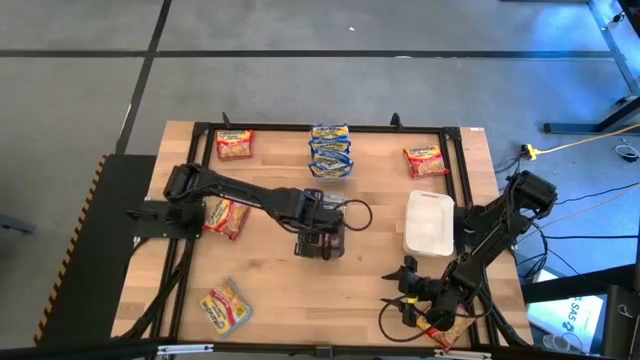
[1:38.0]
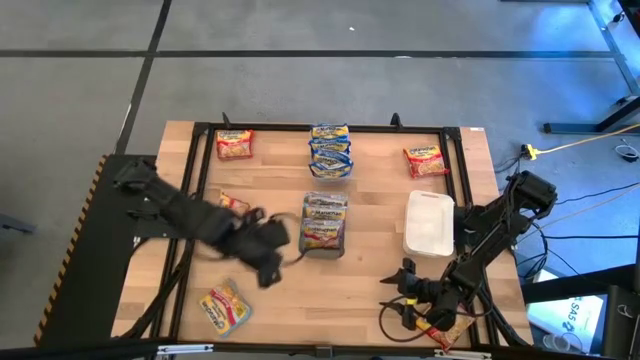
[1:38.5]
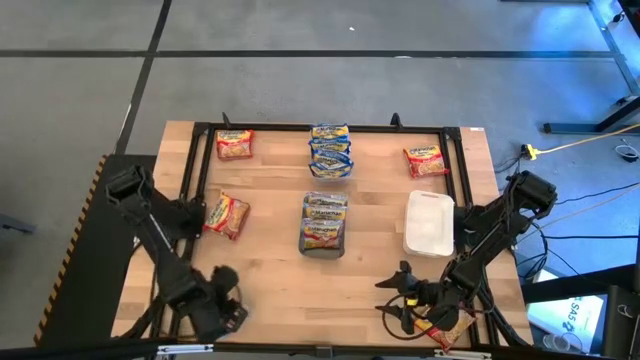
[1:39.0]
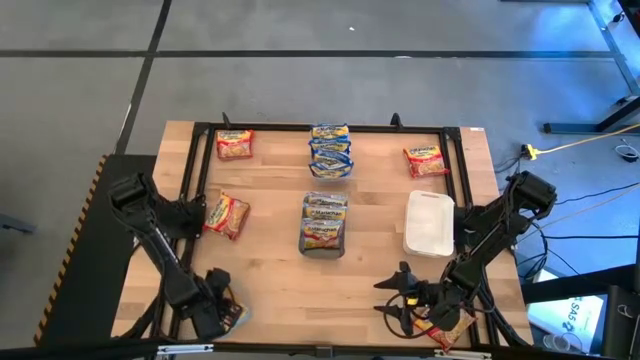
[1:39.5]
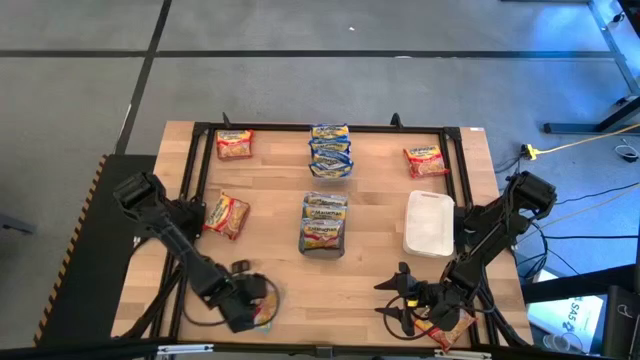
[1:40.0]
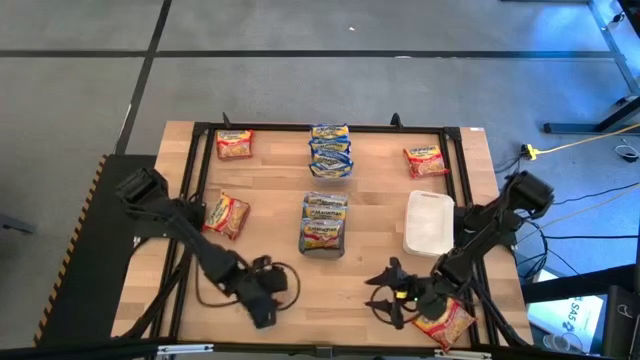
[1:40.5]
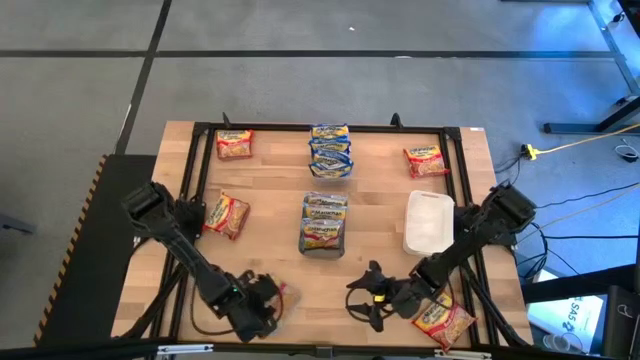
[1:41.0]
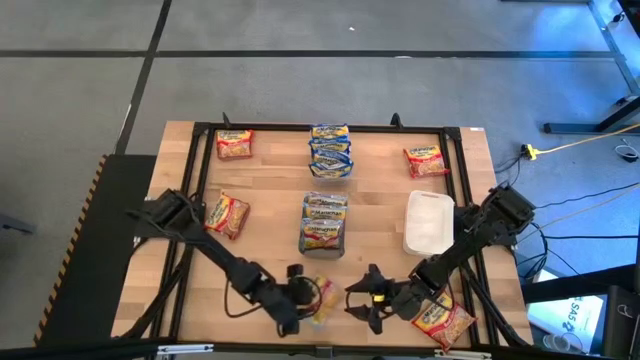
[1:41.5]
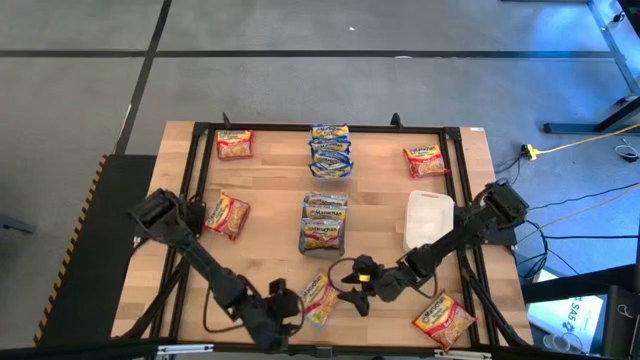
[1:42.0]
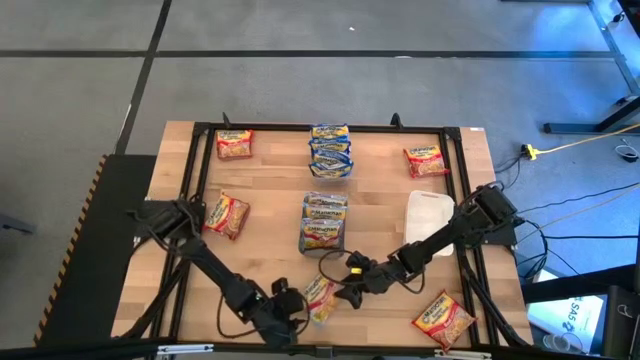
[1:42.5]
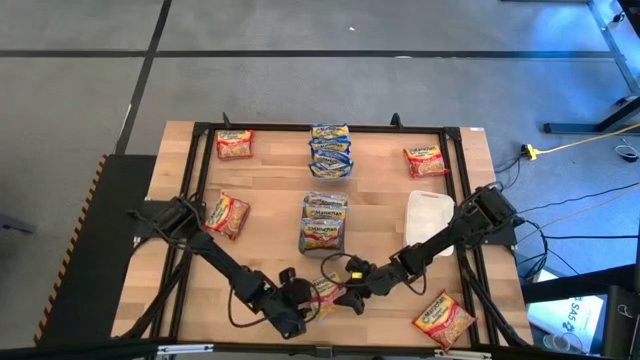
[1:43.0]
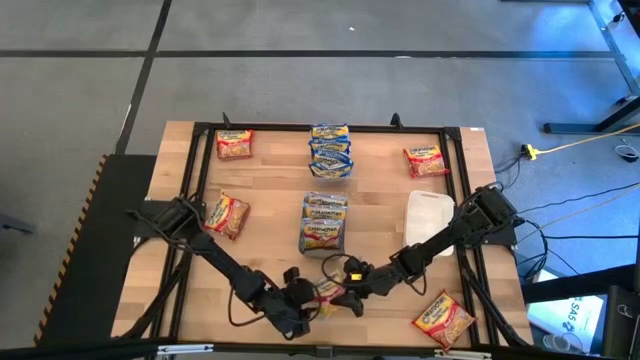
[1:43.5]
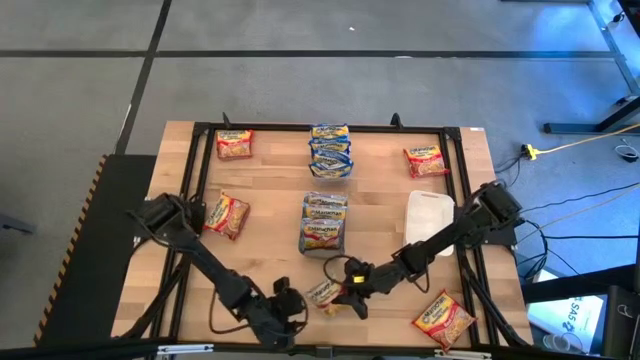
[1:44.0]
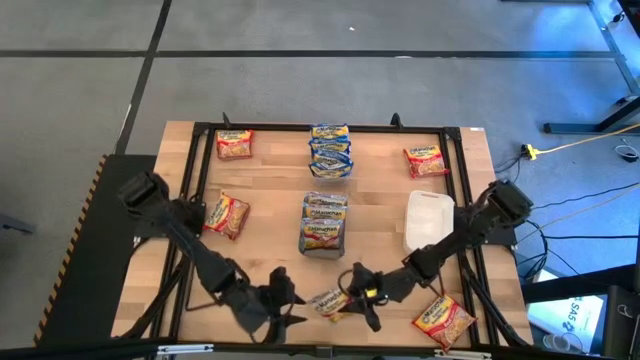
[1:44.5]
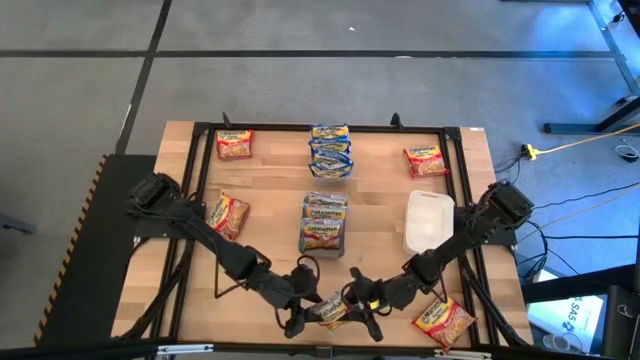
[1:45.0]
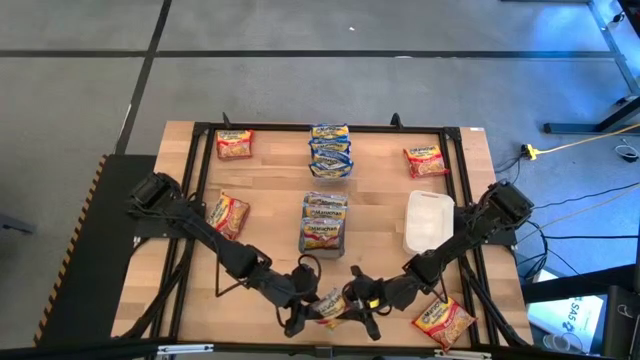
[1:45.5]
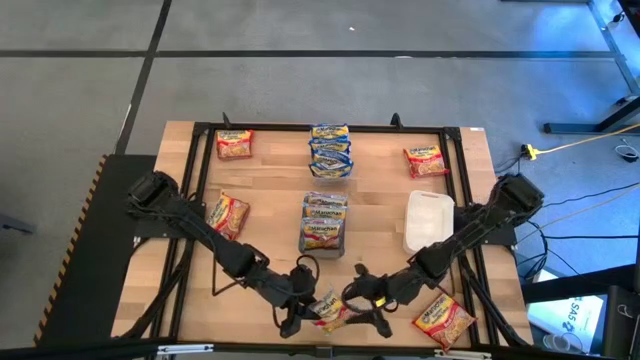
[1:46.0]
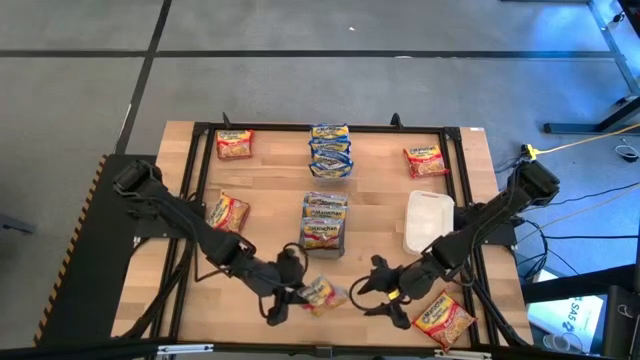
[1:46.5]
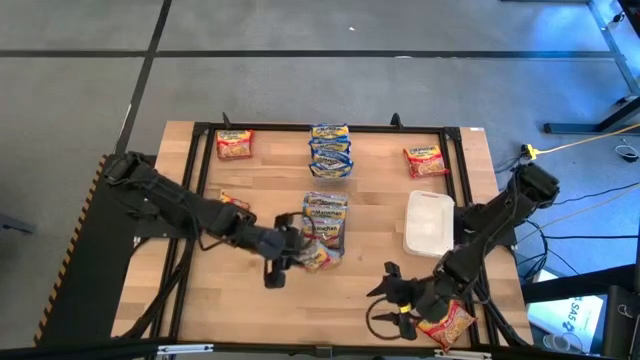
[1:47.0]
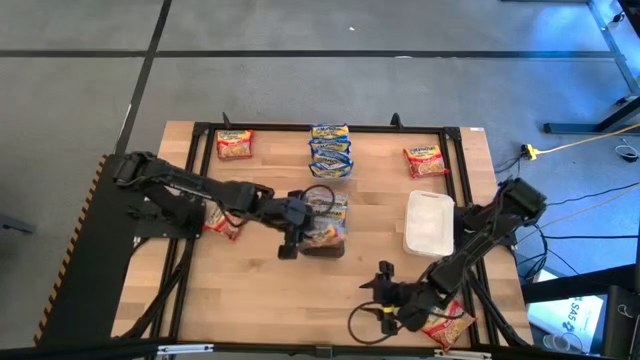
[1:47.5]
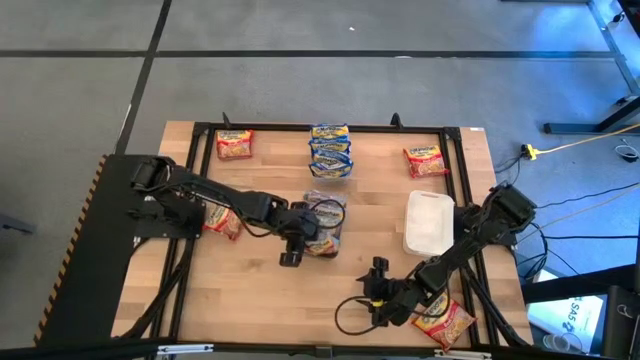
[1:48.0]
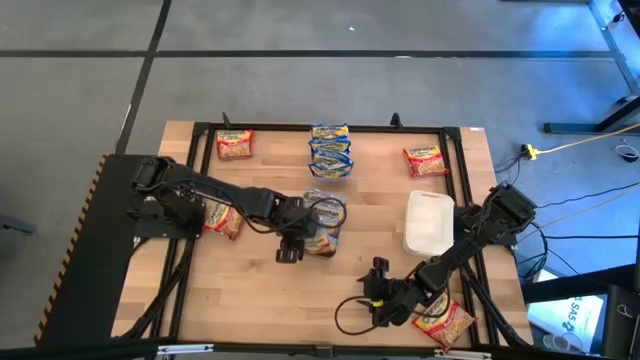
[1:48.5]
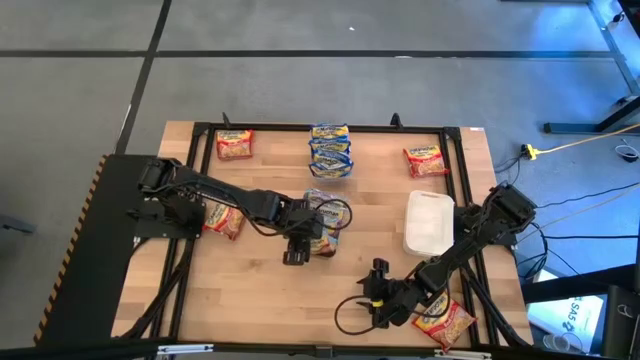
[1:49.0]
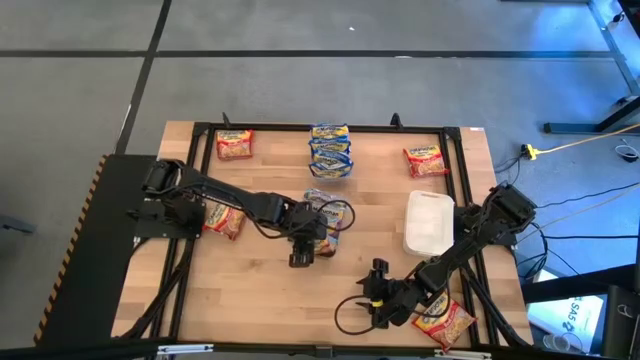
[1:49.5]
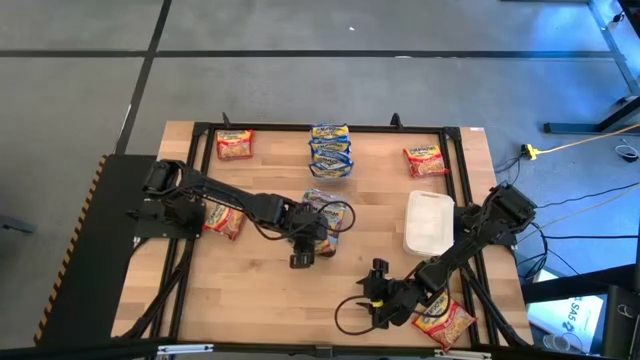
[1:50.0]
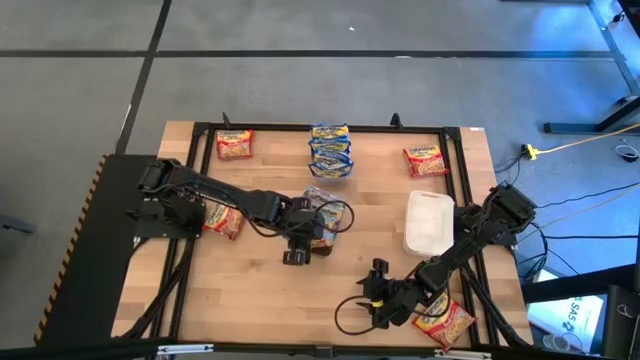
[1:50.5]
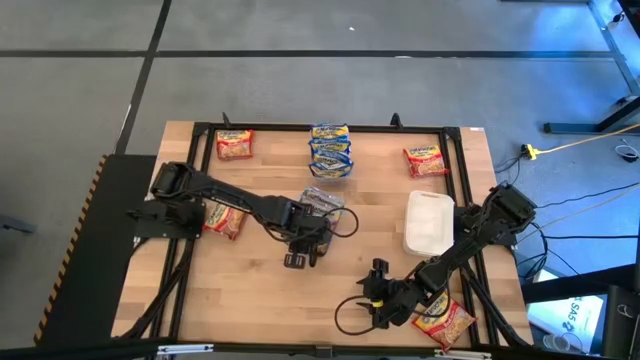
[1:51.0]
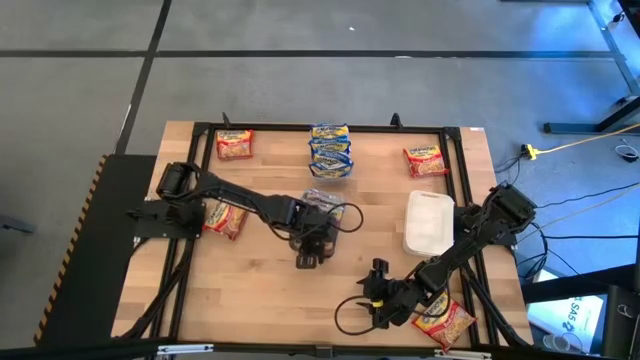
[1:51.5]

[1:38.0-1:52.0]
Task: Sort Maruchan noodles
Put the light blue noodle pack into the black bin

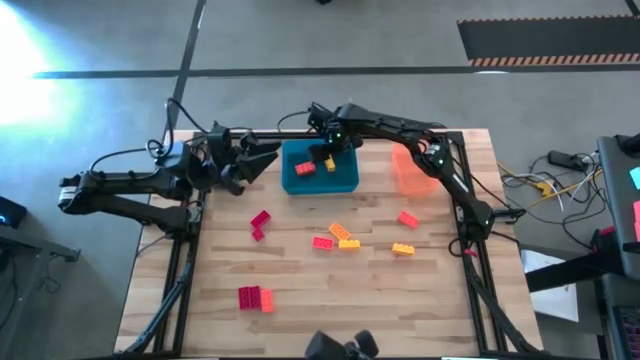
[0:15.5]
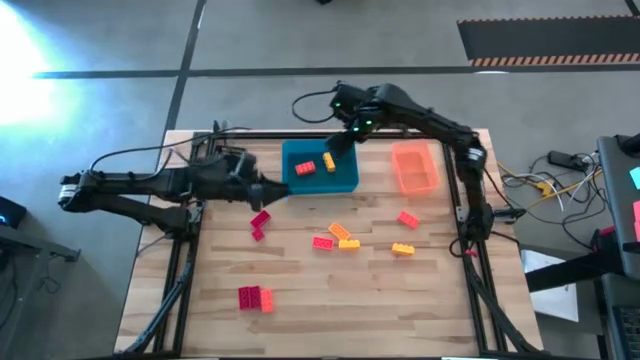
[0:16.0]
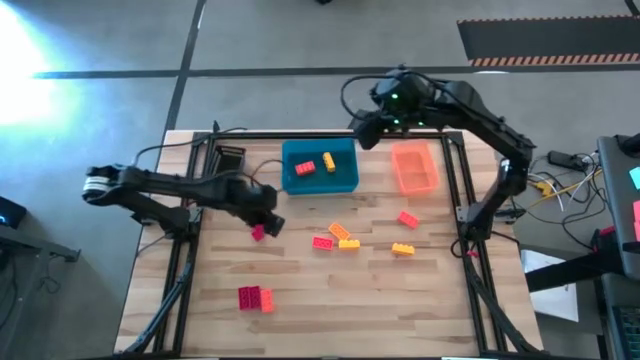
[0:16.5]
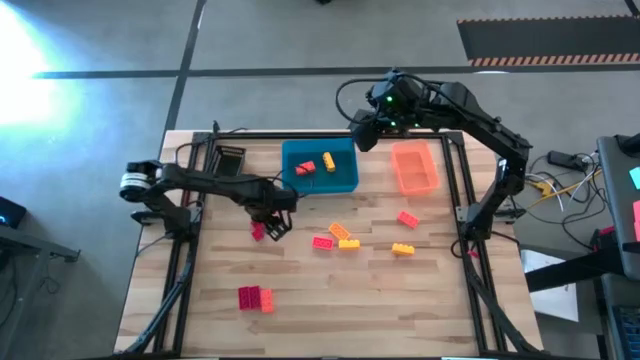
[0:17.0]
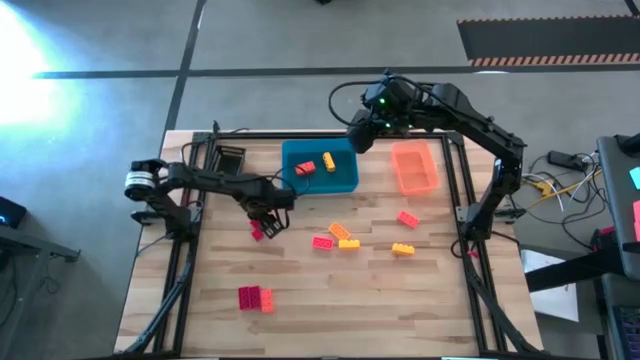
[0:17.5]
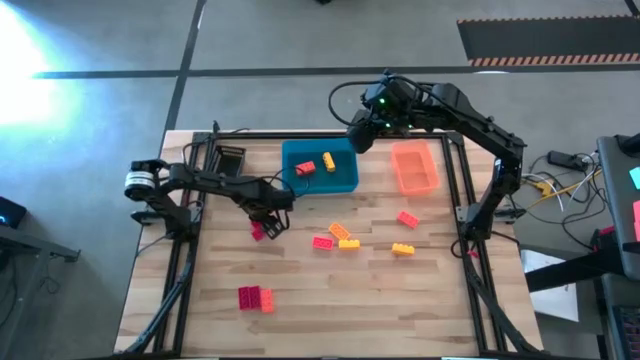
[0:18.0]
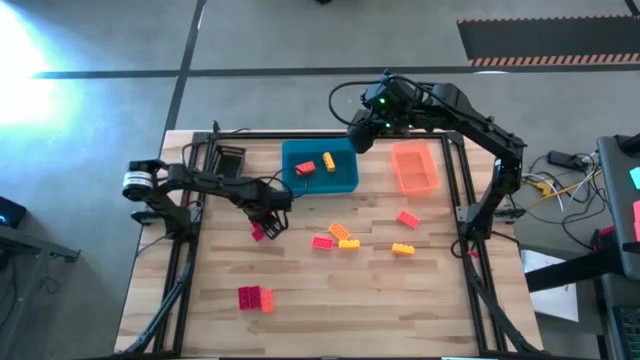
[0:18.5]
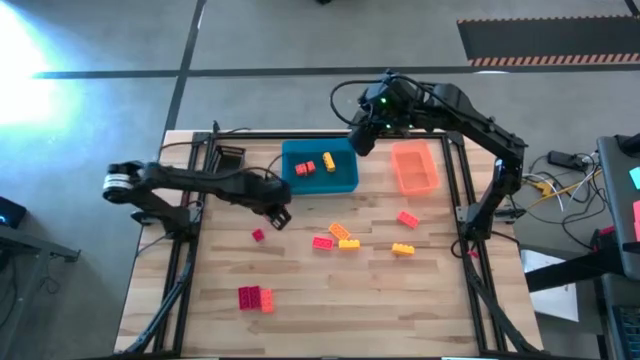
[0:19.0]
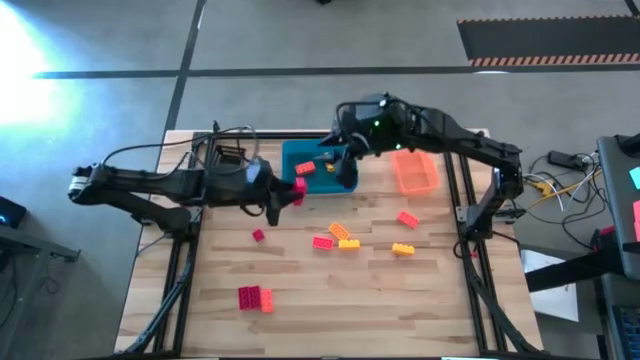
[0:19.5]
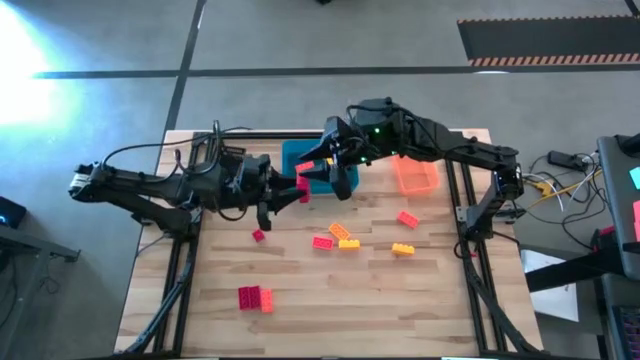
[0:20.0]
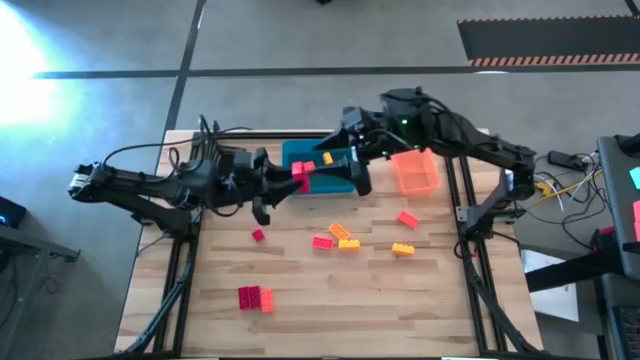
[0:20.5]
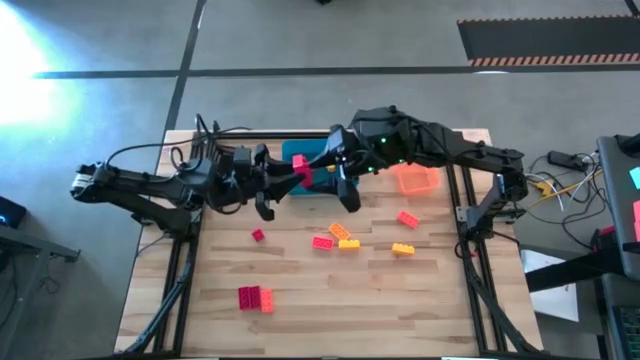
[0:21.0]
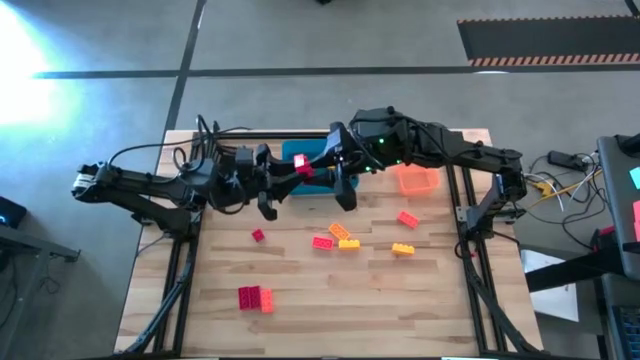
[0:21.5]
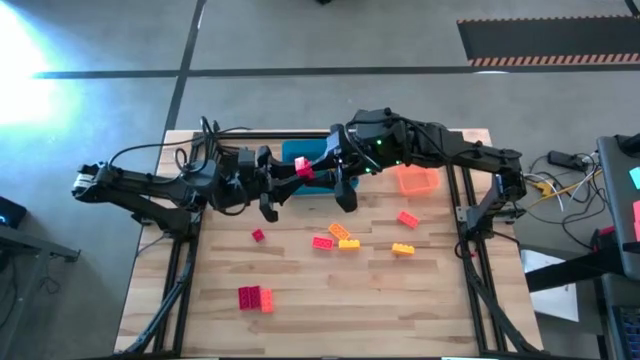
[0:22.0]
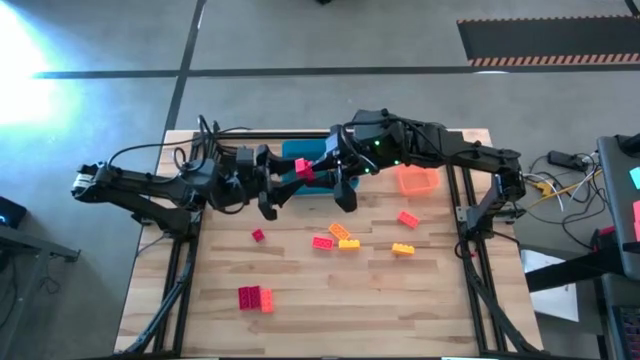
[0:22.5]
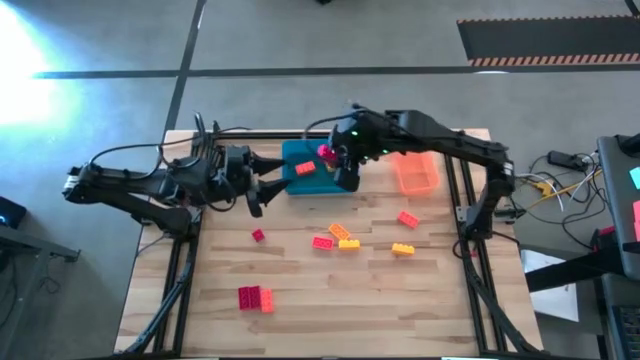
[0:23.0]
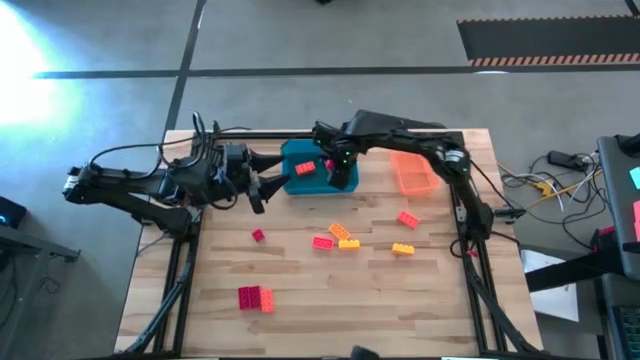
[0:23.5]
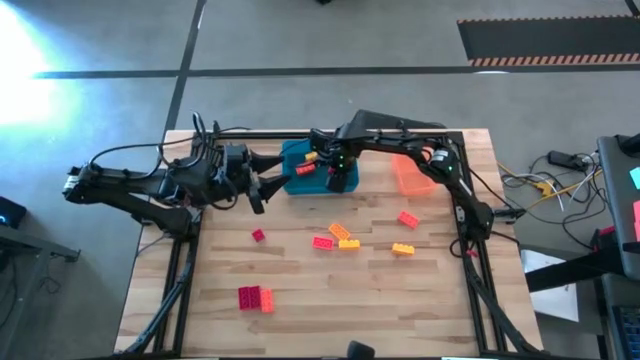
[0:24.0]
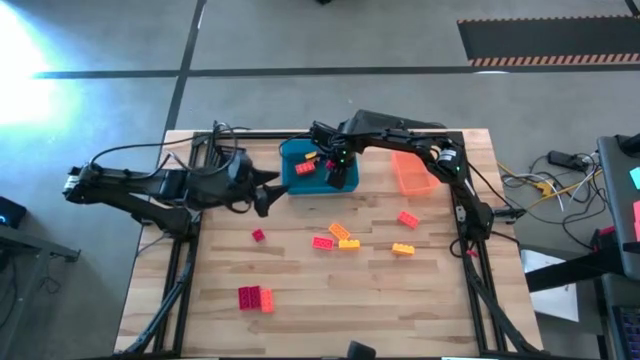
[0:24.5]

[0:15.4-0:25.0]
Task: Sort & place blocks by color
Put the red game piece into the orange bin
